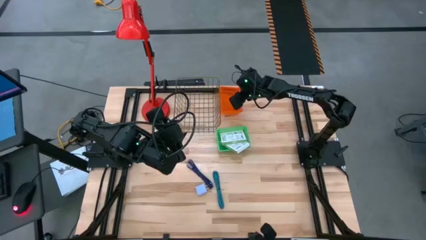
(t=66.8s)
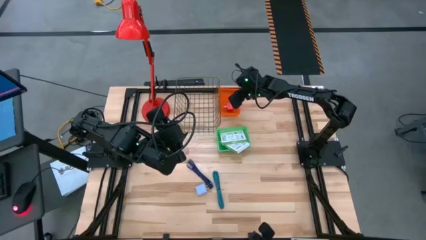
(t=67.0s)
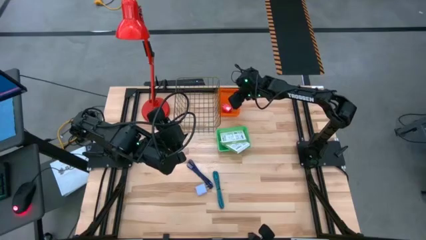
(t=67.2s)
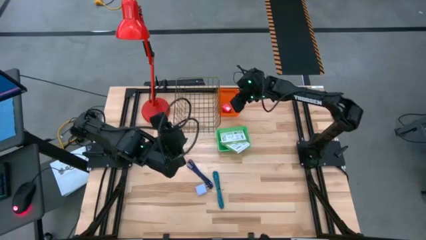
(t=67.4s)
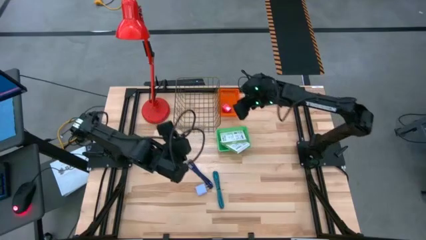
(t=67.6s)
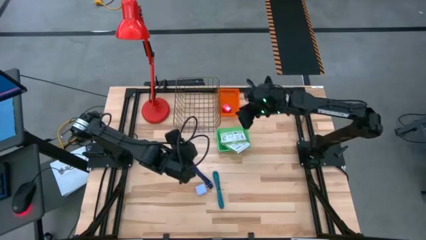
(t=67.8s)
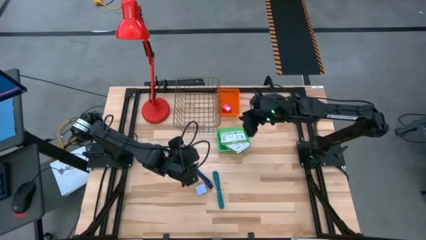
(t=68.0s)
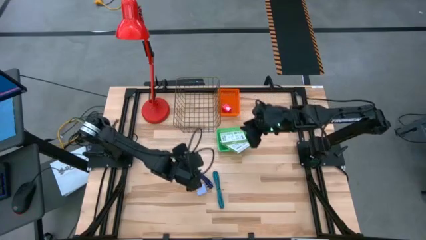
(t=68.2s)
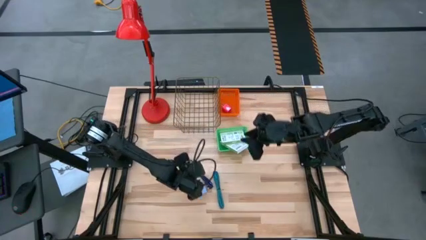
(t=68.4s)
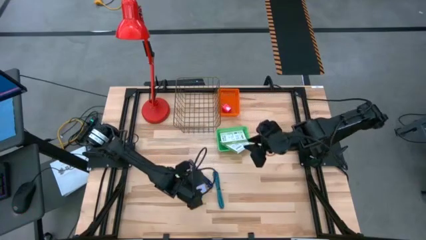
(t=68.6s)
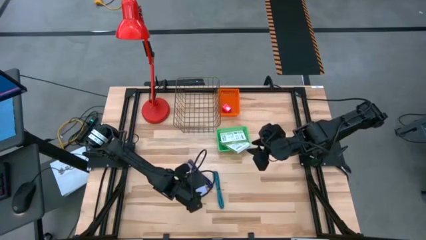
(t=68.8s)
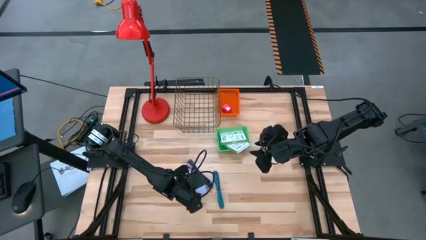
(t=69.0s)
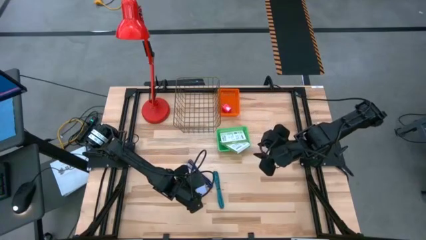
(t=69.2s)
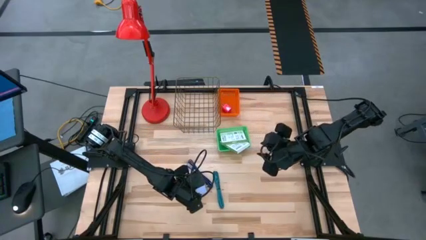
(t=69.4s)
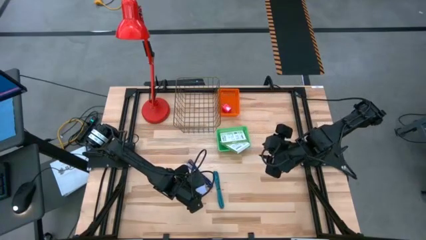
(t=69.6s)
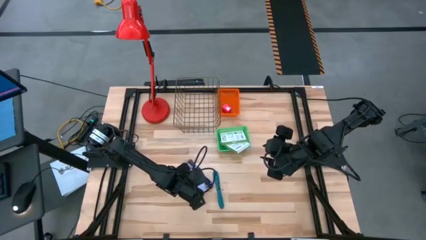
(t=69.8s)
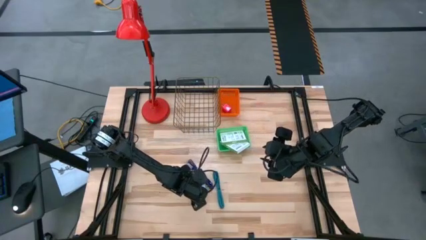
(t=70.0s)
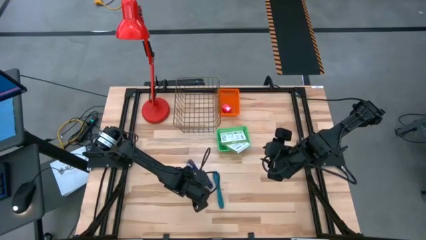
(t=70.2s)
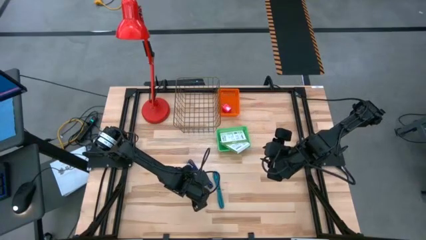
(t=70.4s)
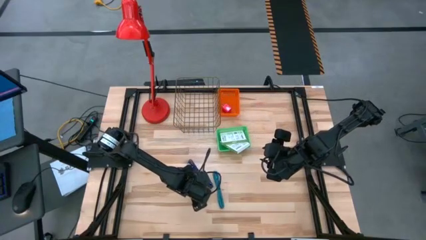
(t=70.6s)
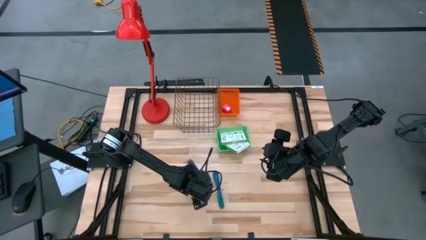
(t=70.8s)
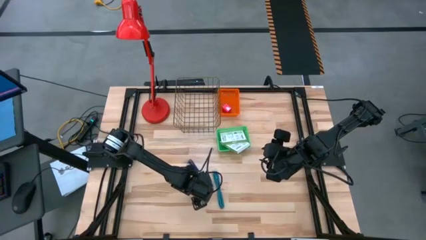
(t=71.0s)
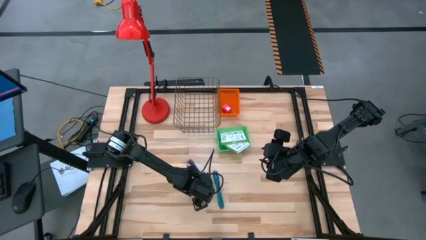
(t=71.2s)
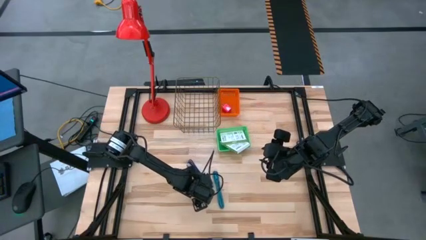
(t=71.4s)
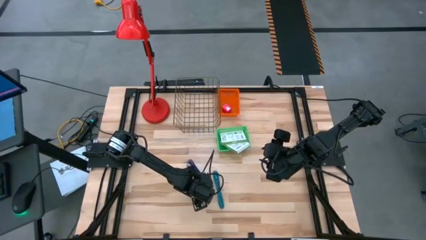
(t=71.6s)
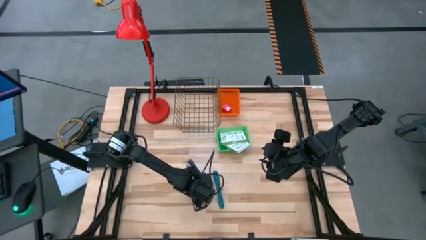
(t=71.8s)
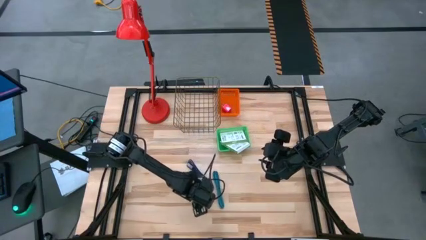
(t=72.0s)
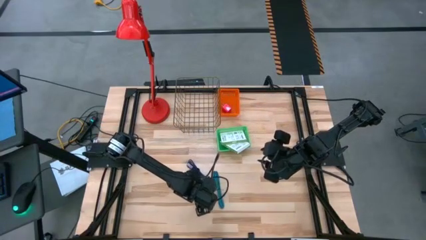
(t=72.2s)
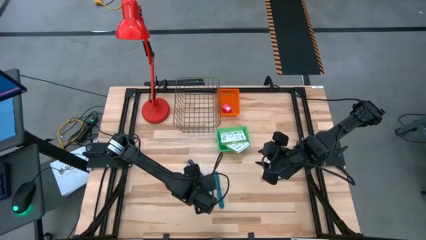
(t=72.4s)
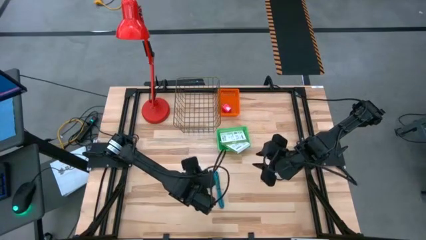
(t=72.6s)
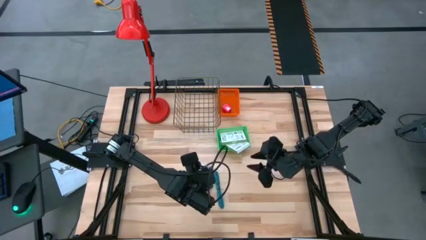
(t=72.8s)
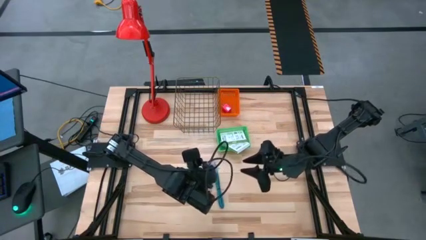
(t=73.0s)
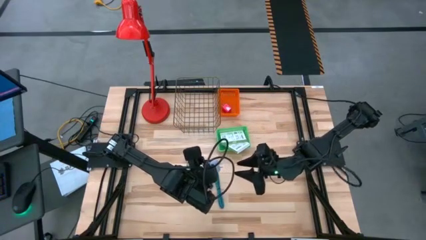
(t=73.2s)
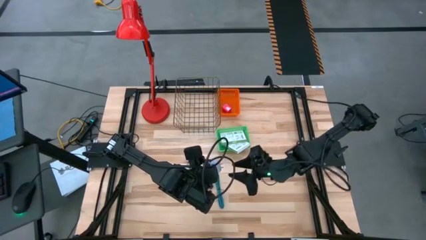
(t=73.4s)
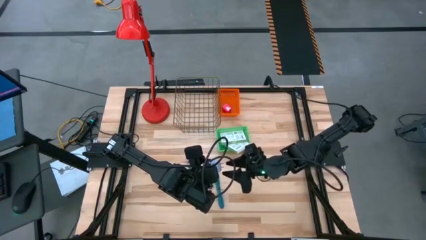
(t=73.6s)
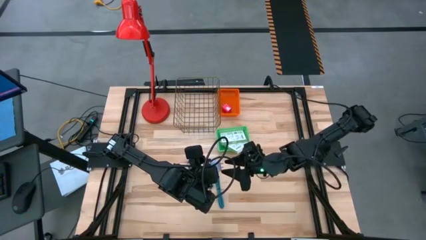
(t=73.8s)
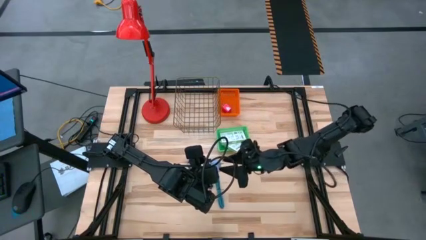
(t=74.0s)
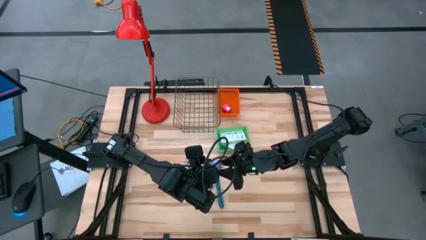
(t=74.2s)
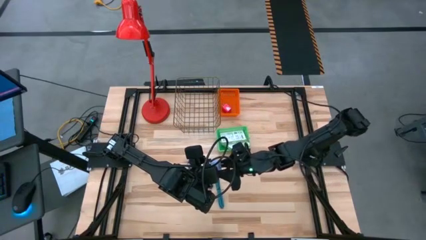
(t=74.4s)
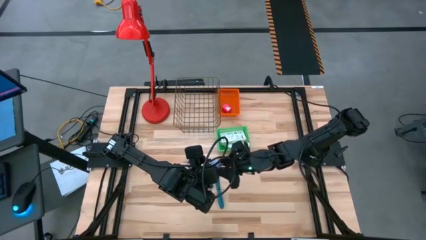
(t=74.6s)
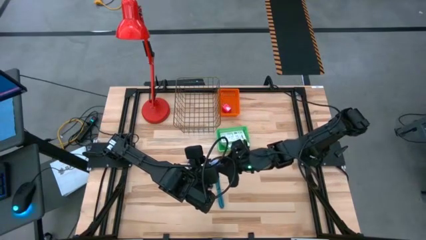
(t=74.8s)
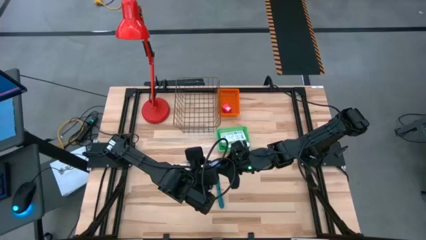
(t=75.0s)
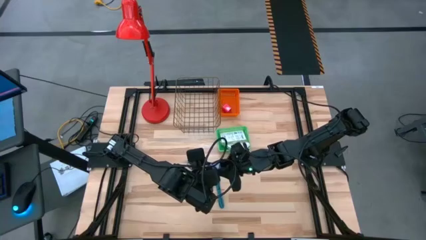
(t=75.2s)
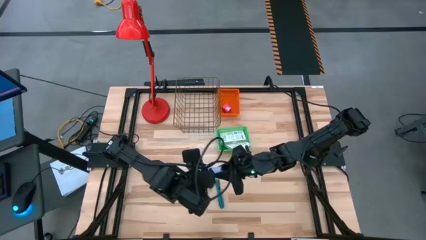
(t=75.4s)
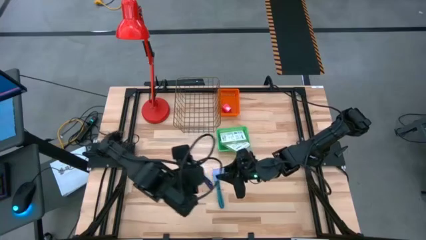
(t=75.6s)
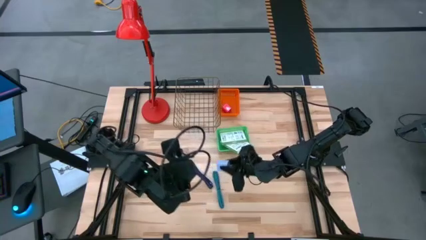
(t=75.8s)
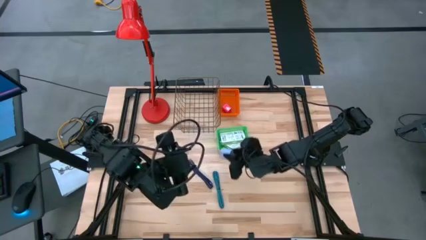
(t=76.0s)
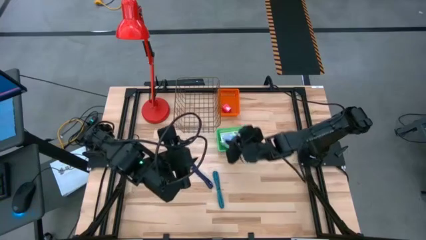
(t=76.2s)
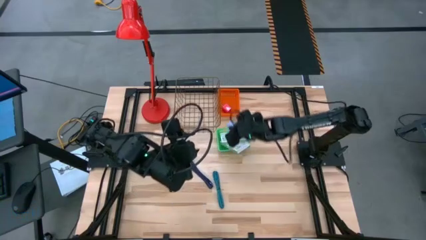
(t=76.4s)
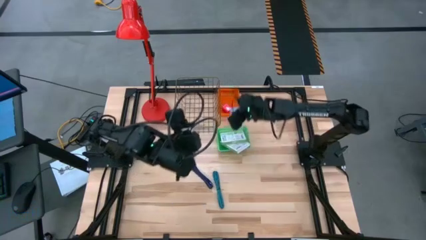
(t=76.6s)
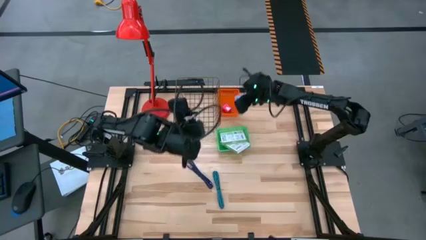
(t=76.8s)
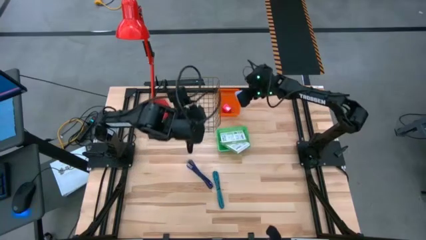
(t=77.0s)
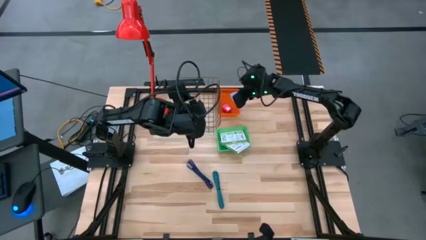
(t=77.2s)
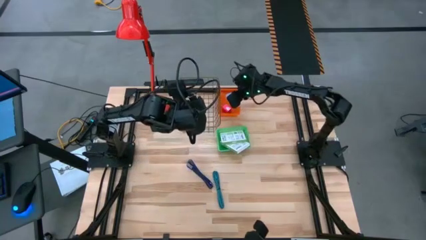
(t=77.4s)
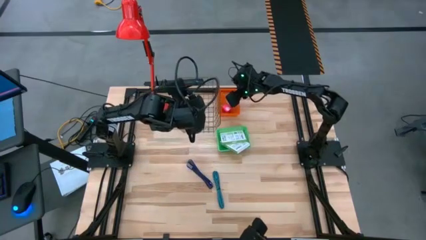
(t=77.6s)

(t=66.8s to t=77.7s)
Task: Pick and place items into bin
Put the purple charger adapter into the orange bin

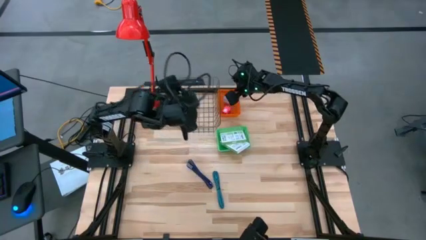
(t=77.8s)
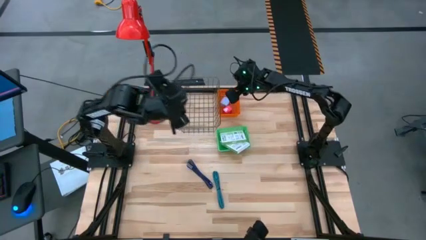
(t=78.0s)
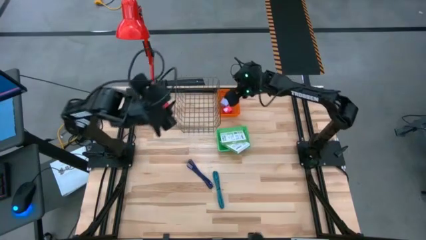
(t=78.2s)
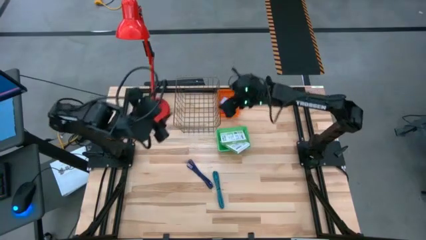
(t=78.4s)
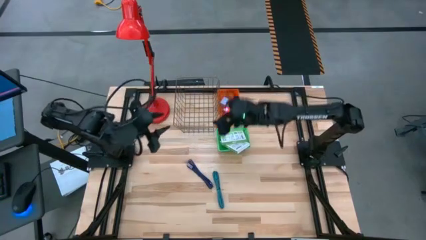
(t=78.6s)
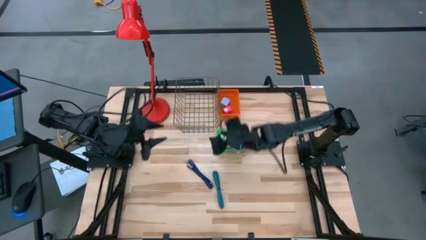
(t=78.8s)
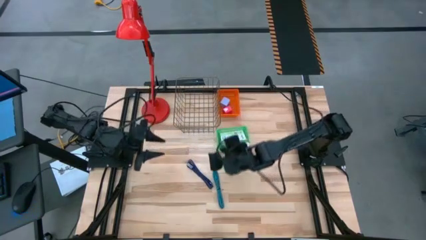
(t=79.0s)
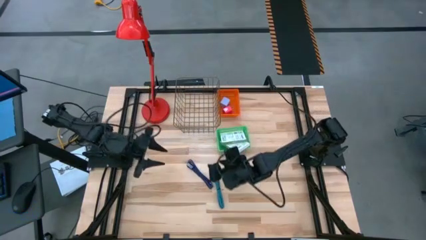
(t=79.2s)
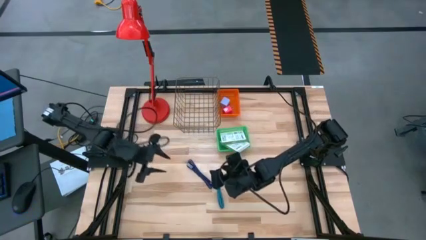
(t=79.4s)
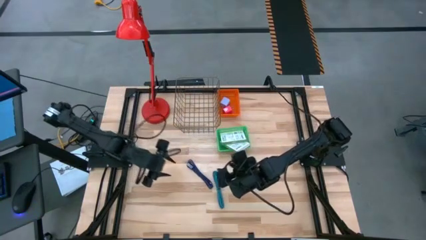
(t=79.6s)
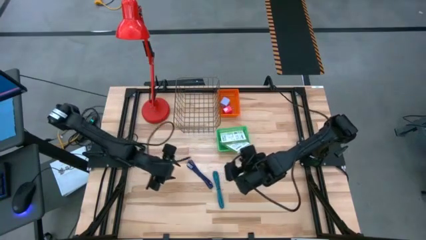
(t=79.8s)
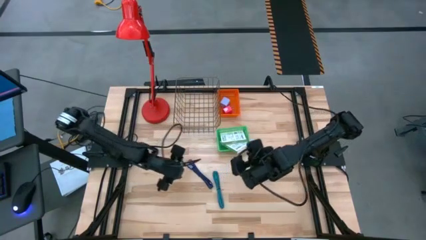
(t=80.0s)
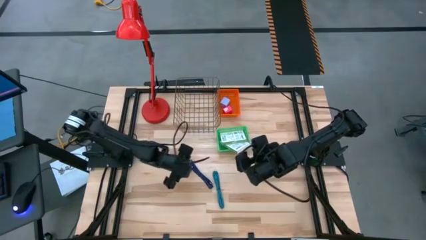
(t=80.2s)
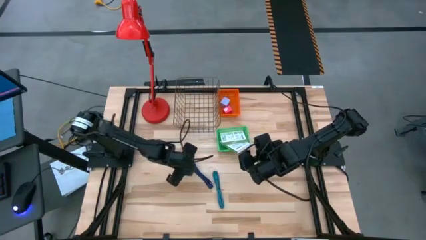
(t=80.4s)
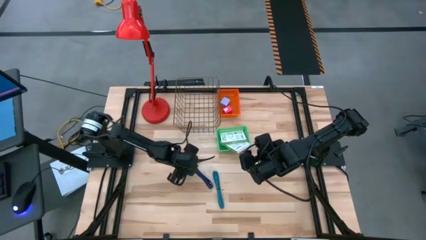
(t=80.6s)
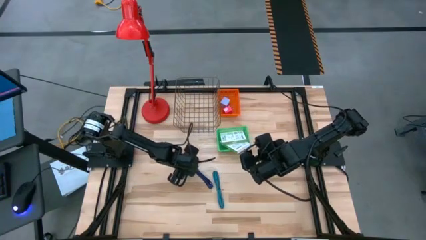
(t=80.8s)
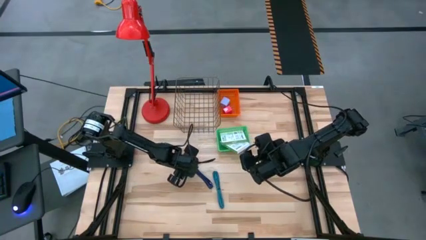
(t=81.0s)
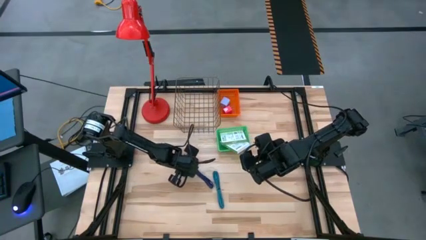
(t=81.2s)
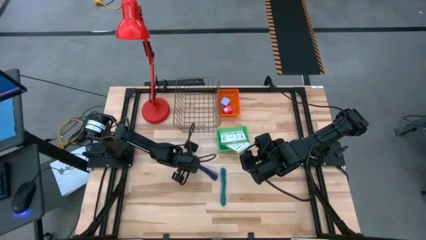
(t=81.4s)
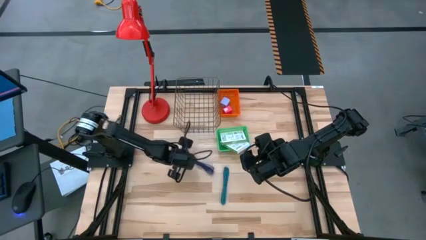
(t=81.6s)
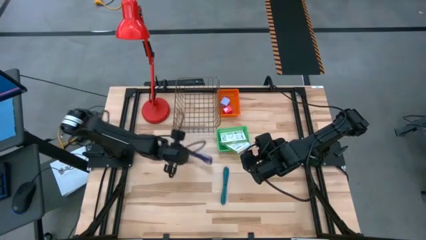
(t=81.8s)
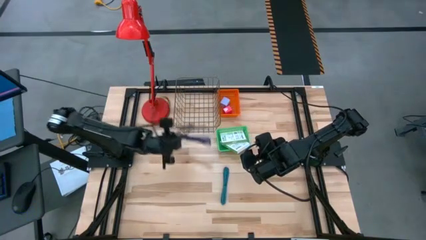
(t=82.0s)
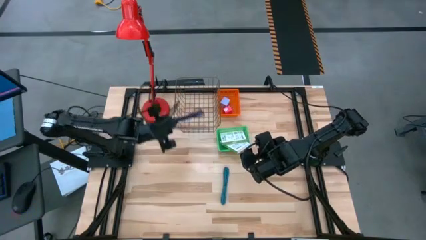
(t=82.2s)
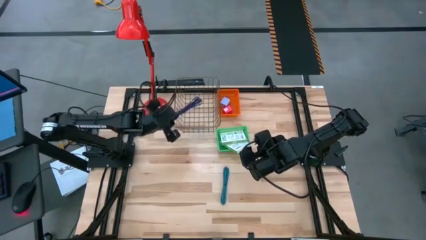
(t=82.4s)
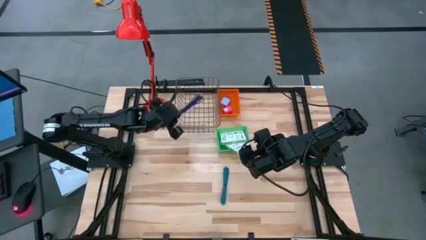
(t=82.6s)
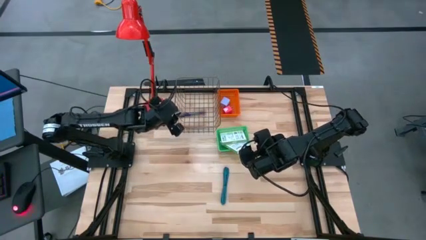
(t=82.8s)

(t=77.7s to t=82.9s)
Put the violet charger cable into the black wire basket

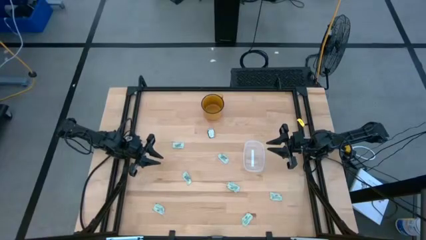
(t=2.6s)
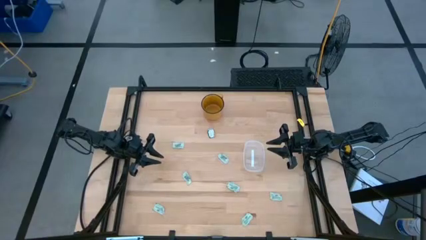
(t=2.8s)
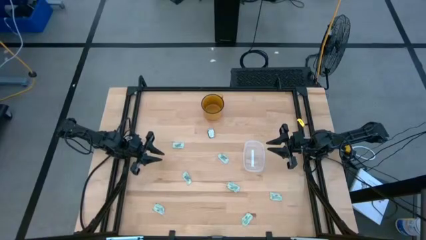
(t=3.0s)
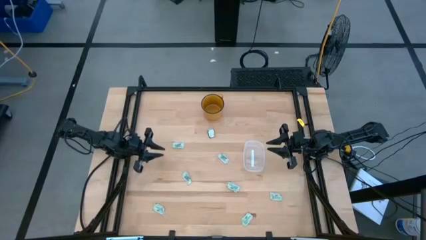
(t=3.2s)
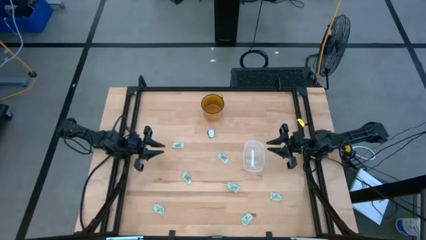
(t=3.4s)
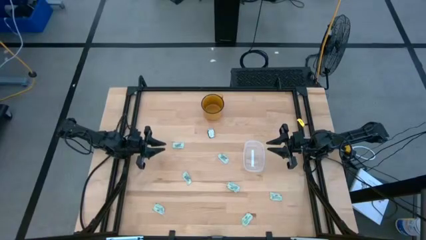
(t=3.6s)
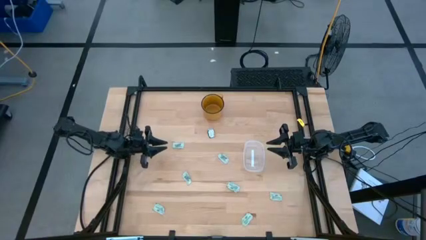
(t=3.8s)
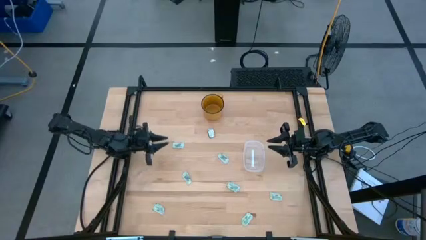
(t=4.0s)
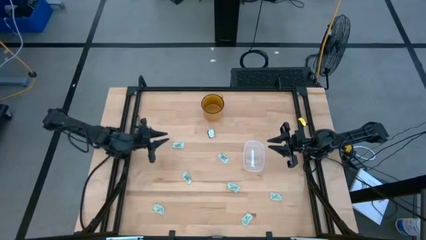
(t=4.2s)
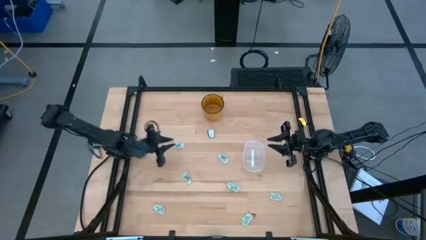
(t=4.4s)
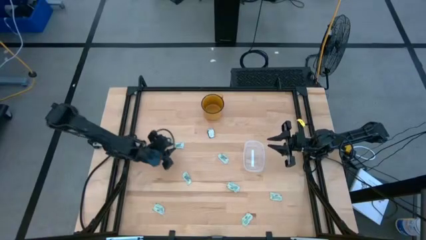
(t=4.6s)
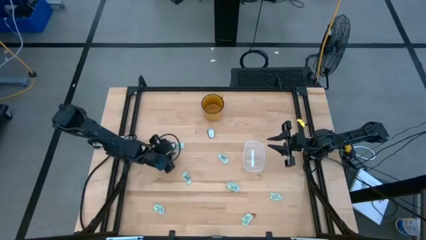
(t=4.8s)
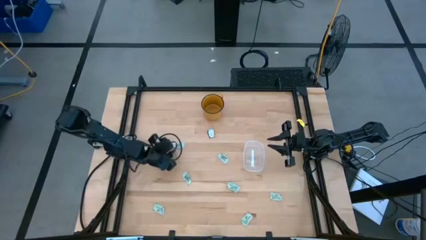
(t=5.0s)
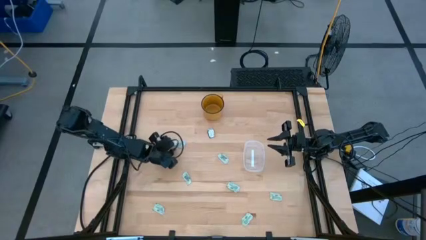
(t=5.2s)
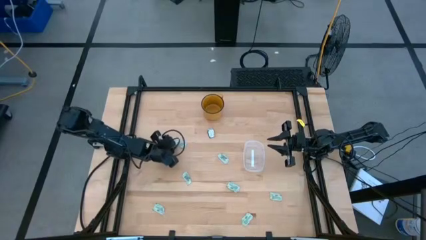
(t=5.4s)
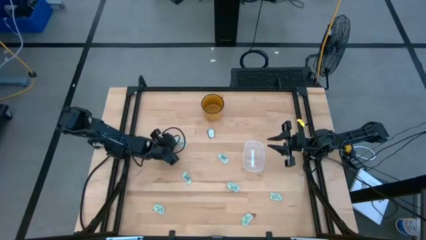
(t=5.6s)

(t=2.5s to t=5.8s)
Task: Pick and place Stevia / Truvia into bins
Put the white stevia packet into the transparent bin
